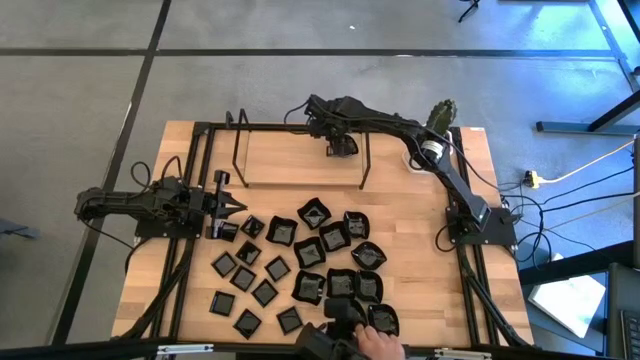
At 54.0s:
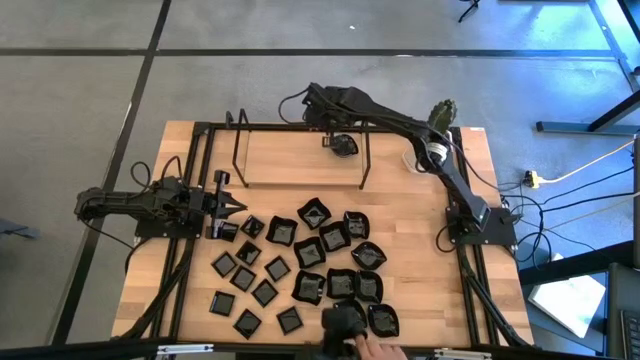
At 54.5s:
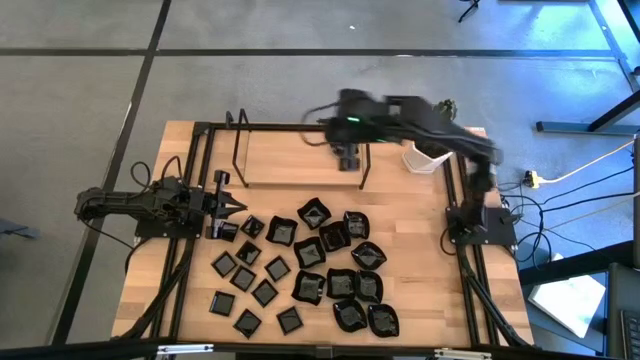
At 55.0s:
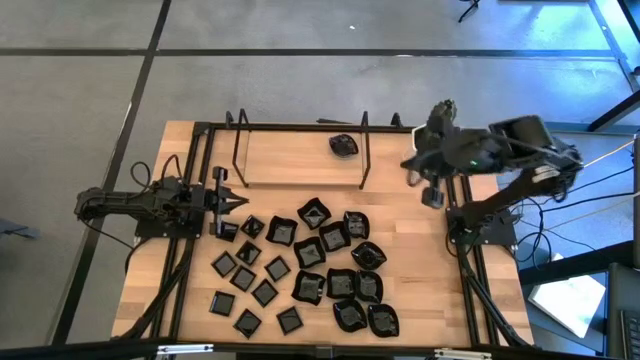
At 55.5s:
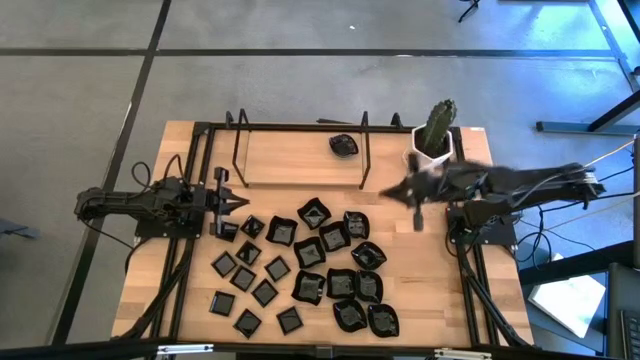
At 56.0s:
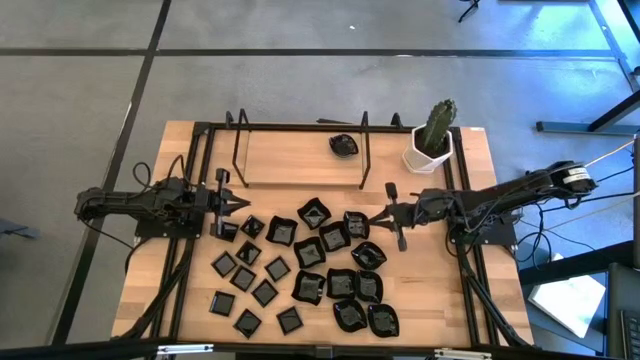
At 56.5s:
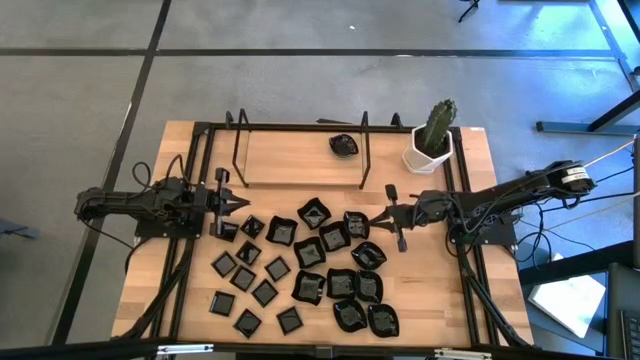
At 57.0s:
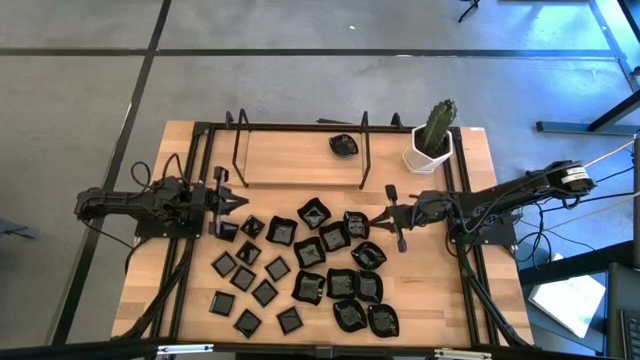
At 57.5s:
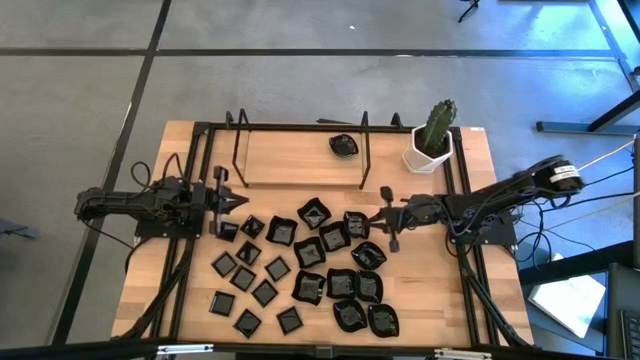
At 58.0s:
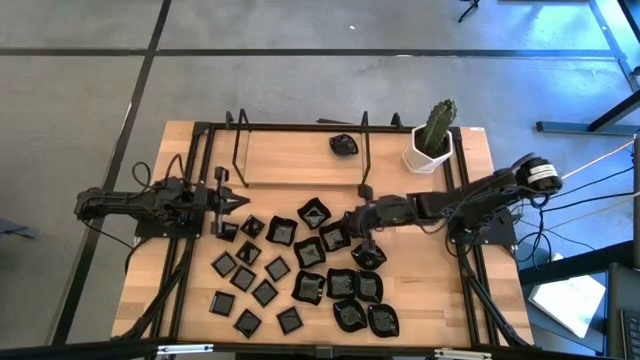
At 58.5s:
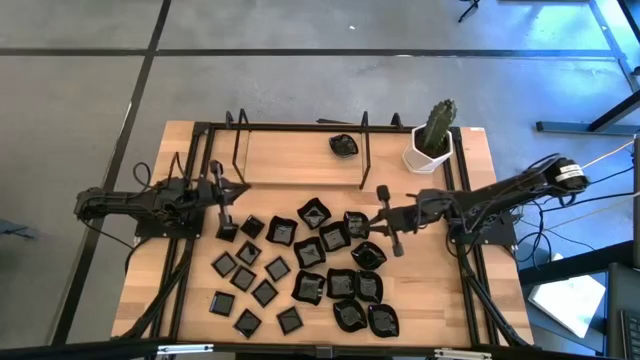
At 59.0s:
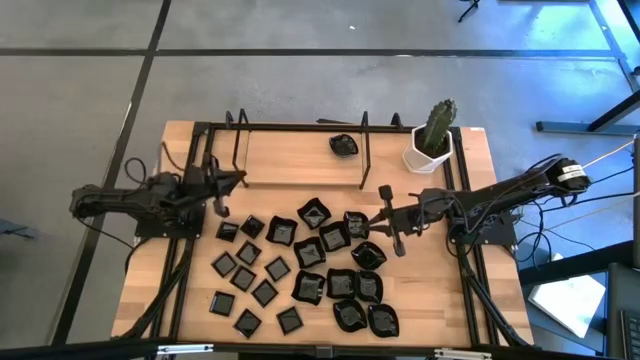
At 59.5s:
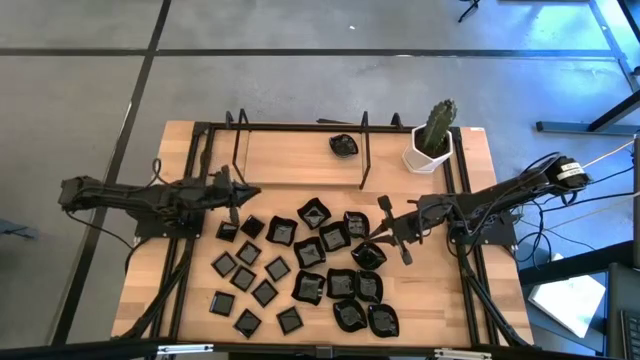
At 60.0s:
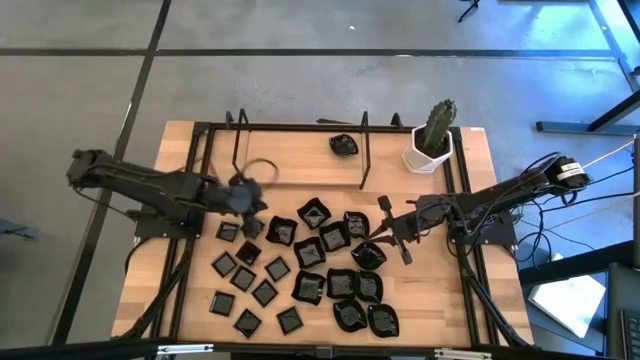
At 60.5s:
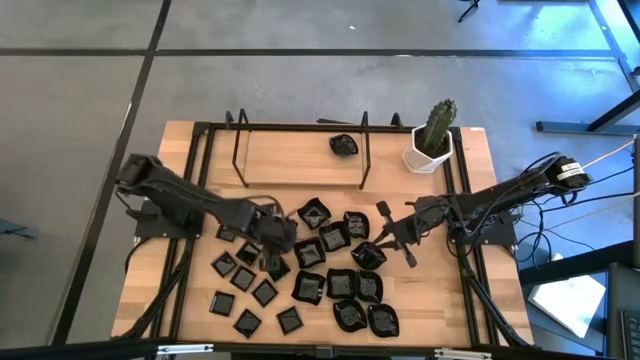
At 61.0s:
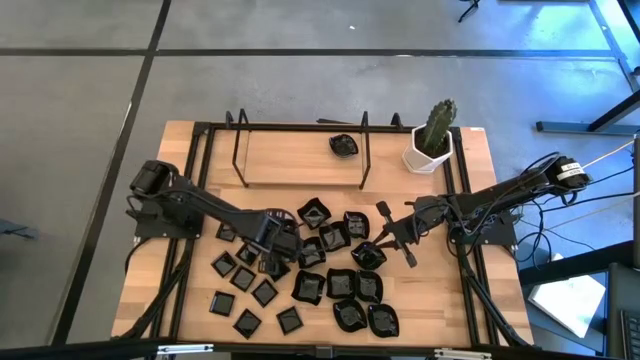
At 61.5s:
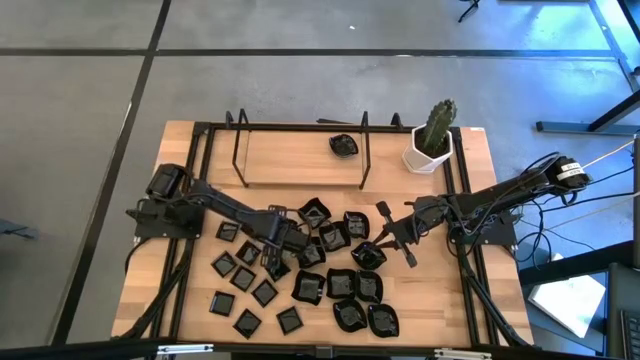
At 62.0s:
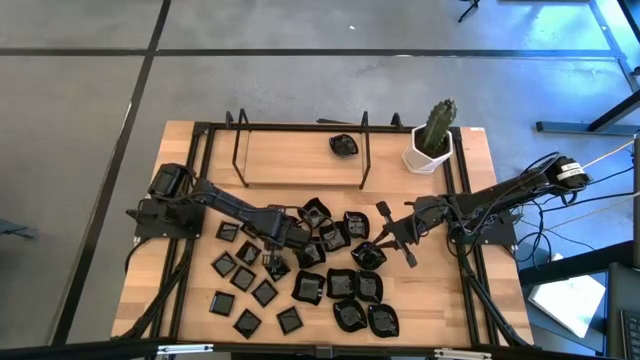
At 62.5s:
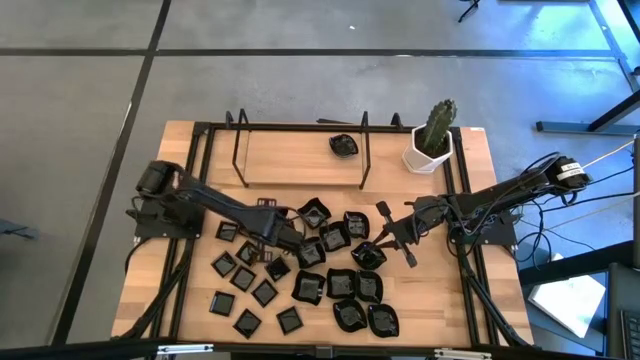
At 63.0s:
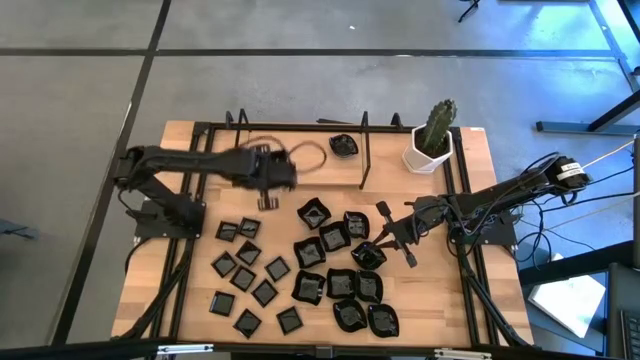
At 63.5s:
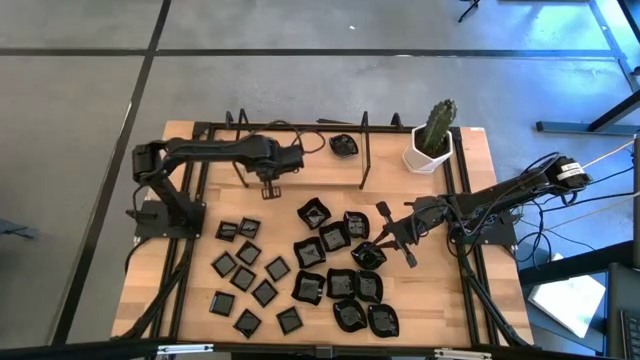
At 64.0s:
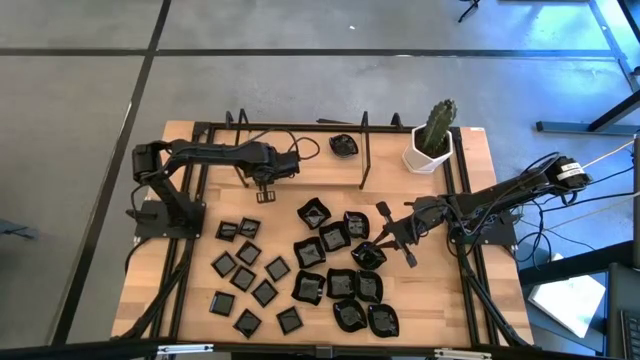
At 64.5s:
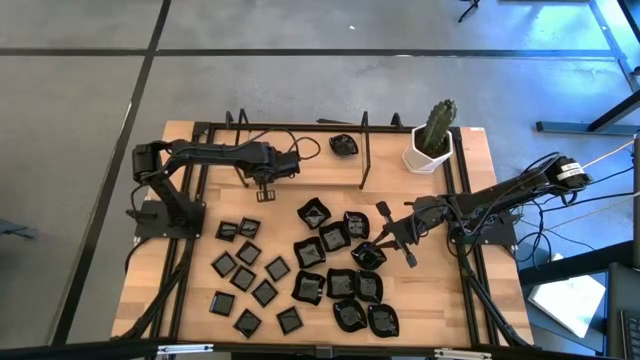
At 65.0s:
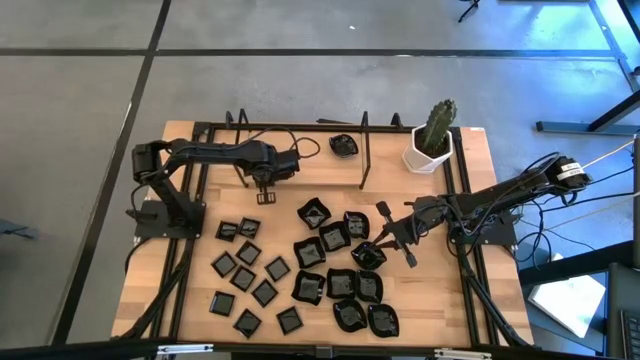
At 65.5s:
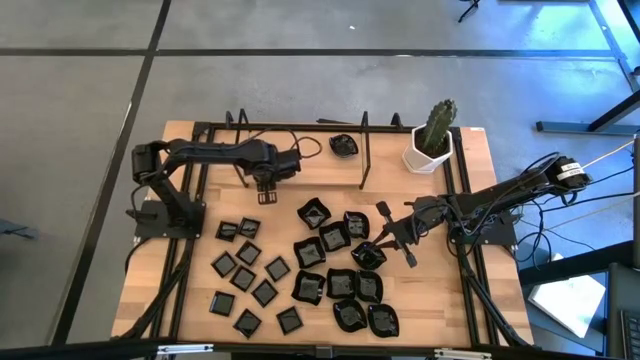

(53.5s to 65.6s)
Task: Pick & Place Mini shaped plates
Put the distorted square plate on the shelf

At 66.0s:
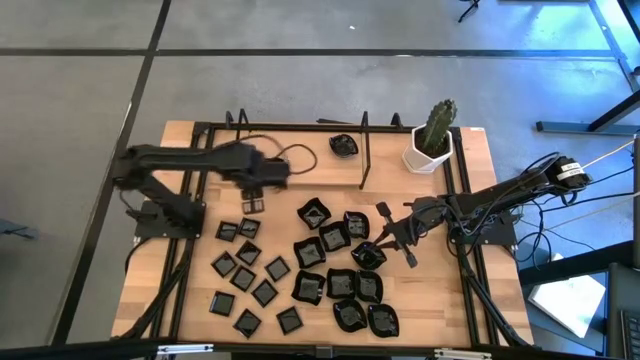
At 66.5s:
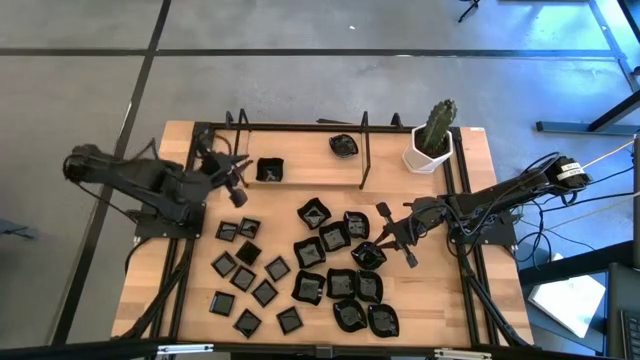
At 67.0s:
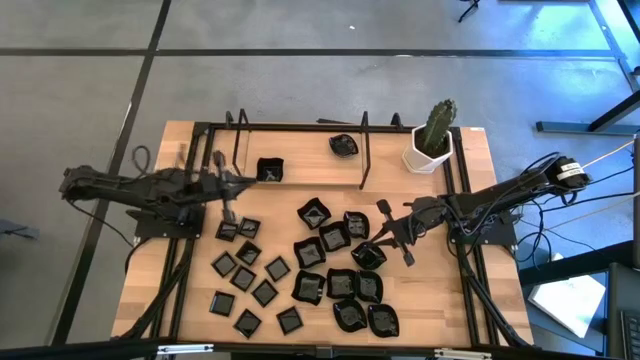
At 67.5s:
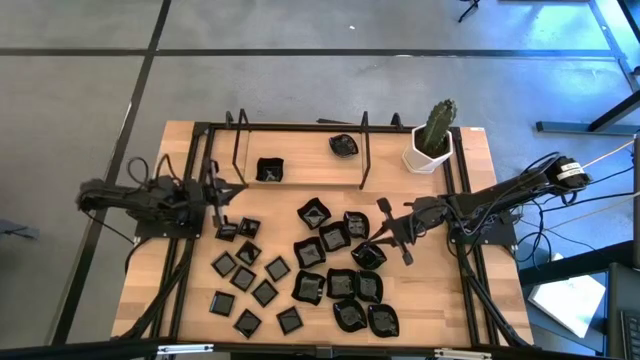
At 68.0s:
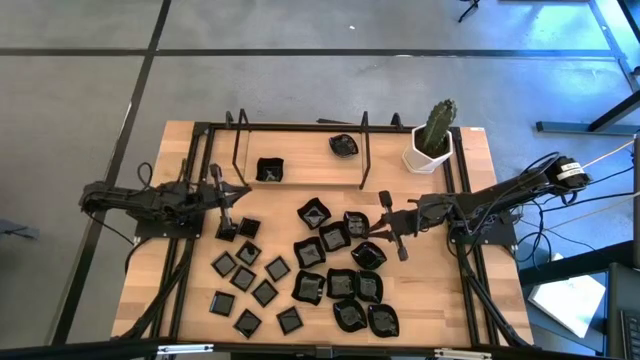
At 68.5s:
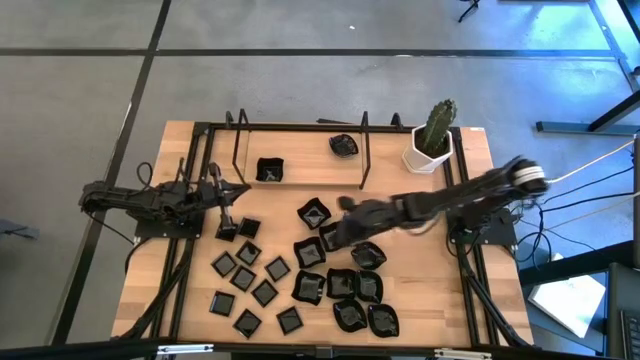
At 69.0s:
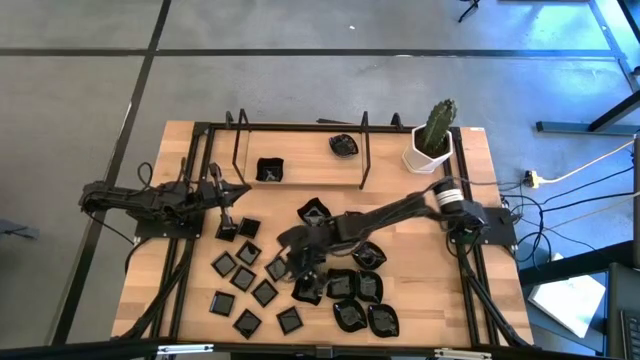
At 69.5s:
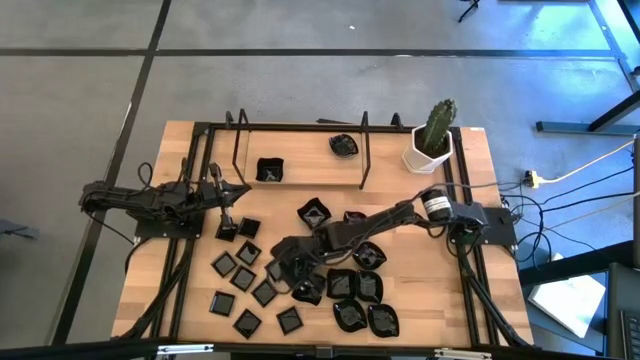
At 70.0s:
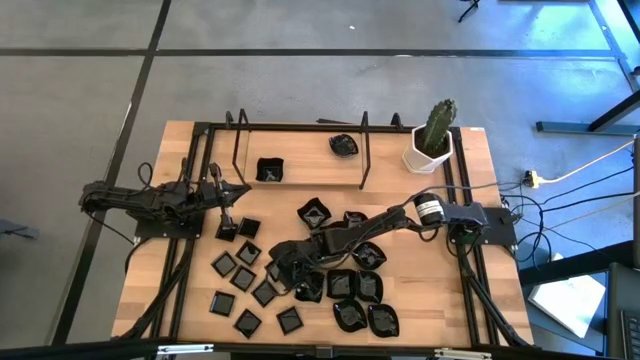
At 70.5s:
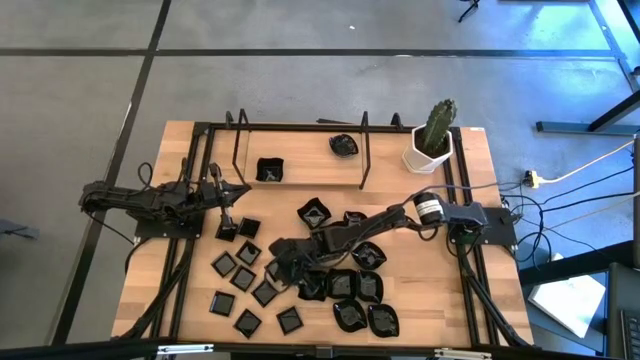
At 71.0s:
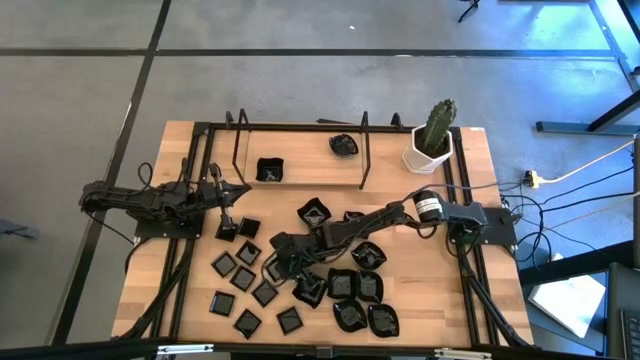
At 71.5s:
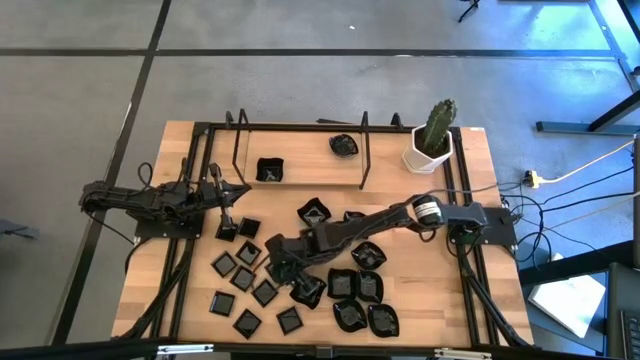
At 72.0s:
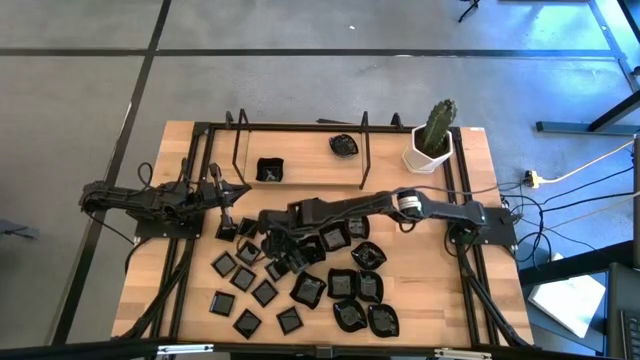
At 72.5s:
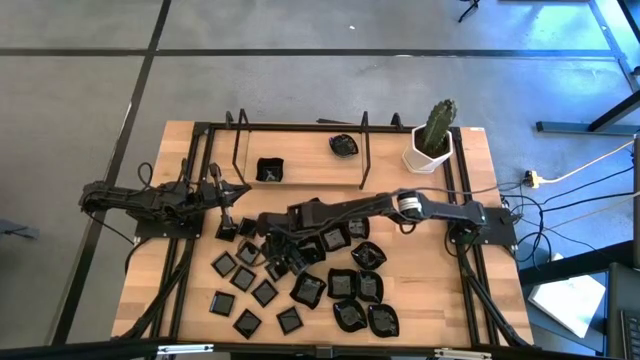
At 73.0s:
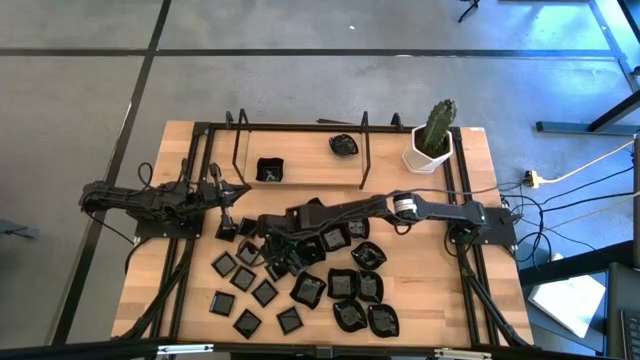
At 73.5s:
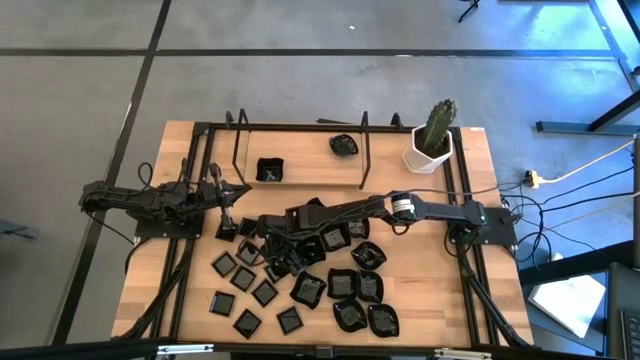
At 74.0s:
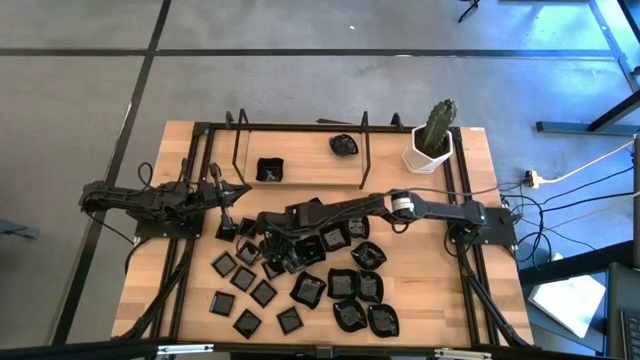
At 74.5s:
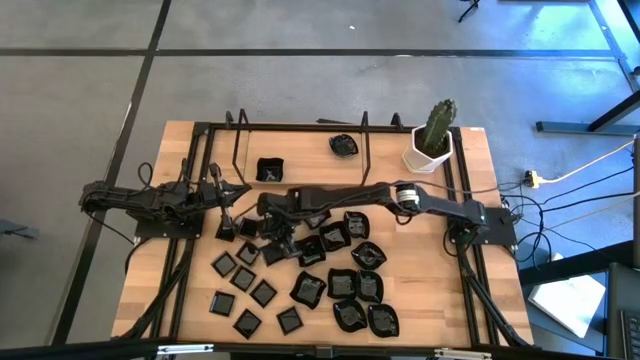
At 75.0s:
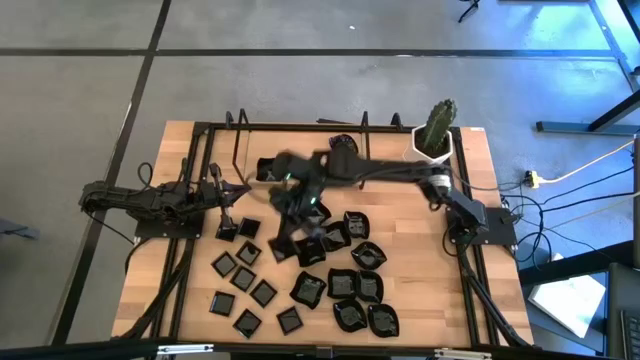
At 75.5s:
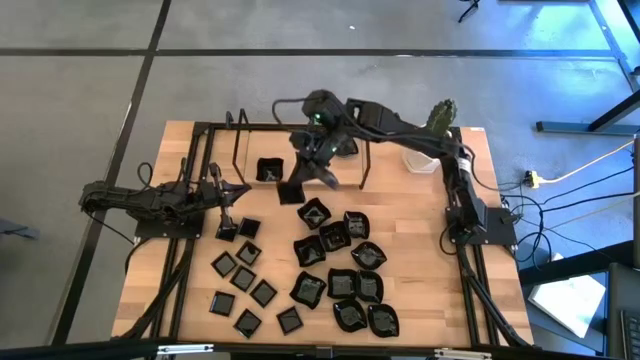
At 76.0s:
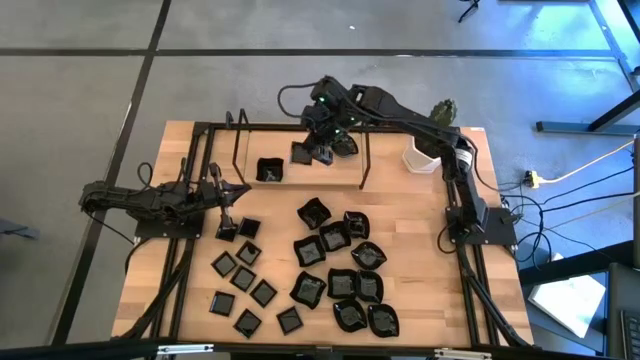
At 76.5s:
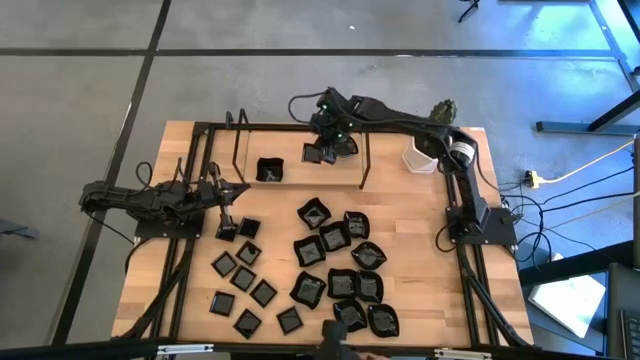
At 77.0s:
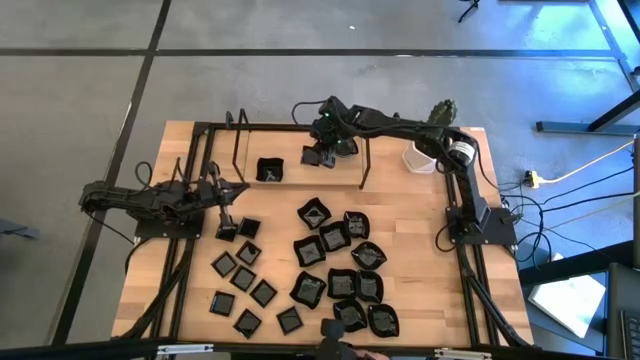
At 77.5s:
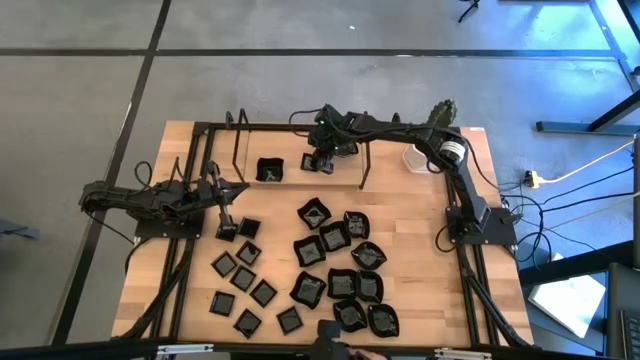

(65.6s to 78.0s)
Put the square plate on the shelf
